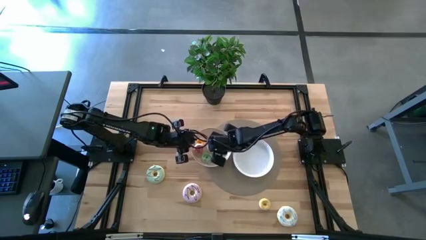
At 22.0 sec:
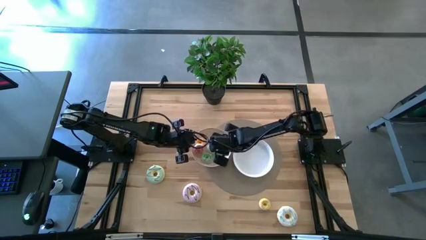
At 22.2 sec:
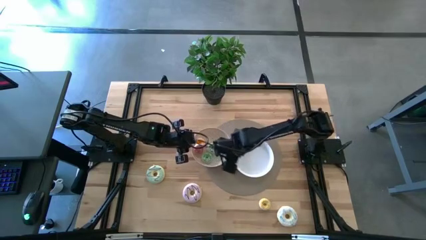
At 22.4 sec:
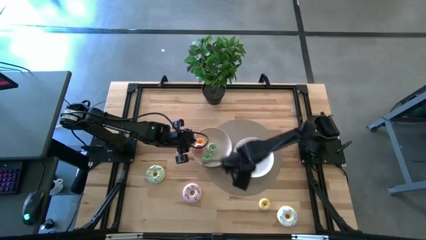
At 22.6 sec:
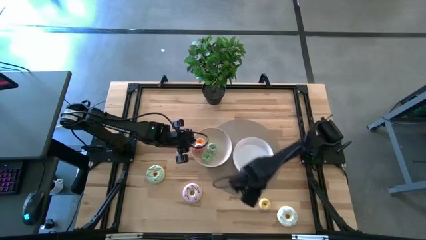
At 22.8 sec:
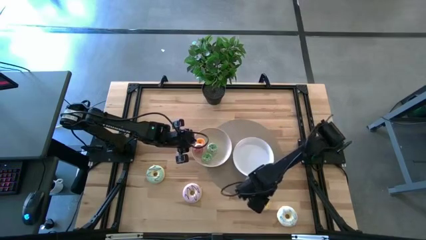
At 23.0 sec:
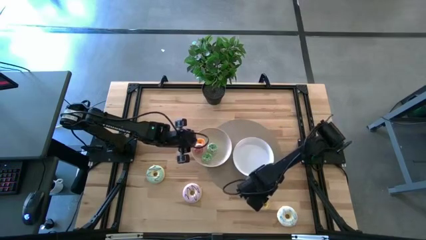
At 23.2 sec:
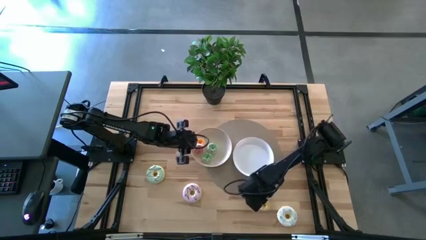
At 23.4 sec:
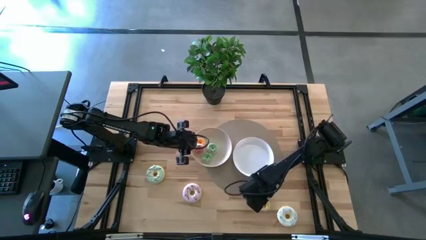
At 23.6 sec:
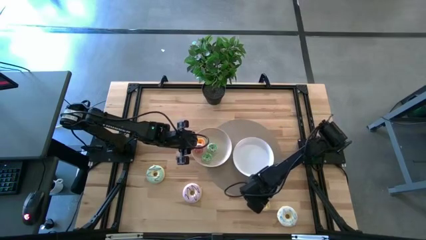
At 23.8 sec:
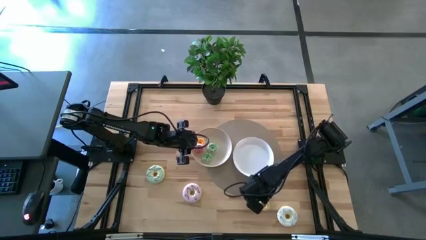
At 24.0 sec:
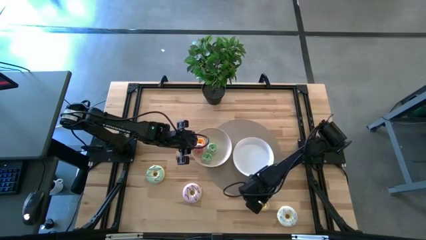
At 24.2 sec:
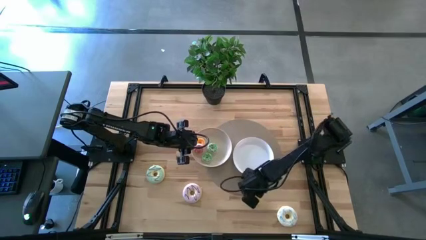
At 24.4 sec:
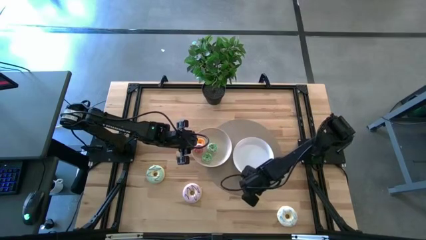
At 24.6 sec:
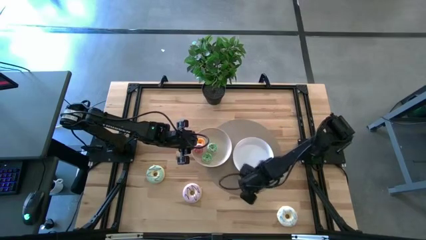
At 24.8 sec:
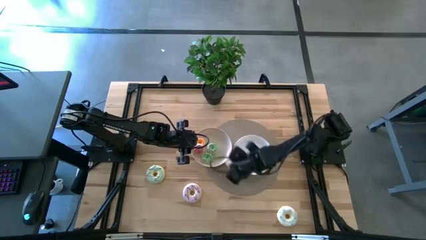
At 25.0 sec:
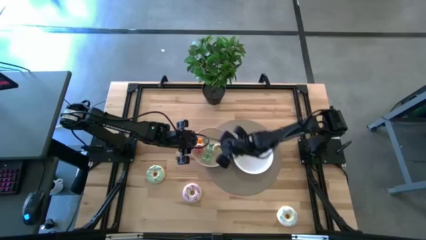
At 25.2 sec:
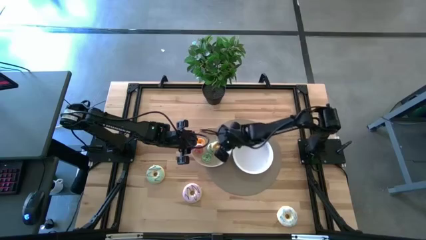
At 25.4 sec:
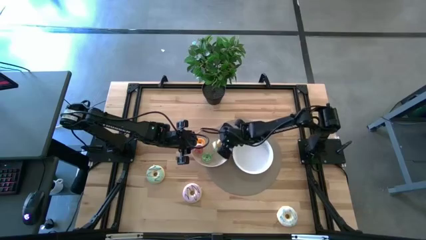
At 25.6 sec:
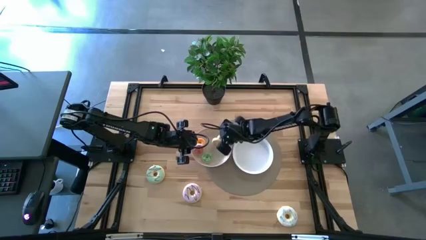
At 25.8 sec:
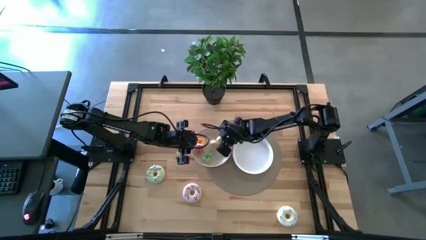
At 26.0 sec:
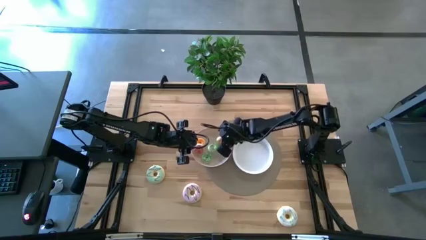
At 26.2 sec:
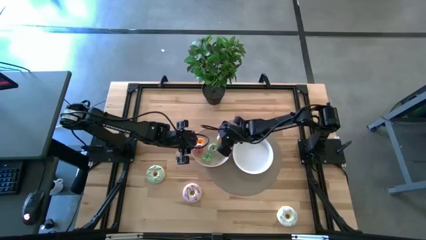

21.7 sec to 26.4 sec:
Task: Pick & Place donuts
Put the small yellow donut into the left white plate

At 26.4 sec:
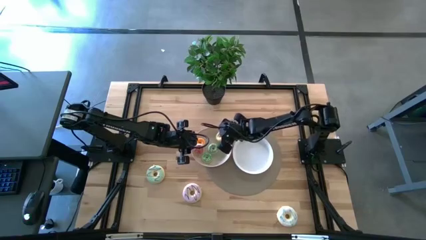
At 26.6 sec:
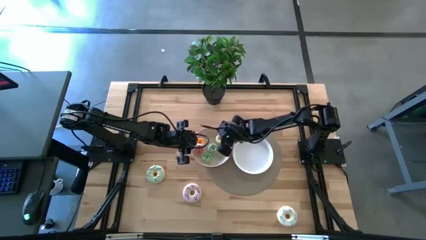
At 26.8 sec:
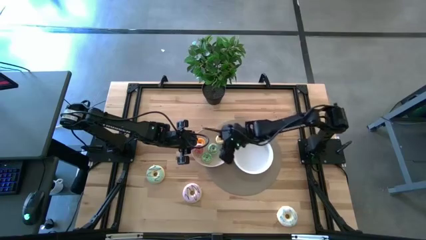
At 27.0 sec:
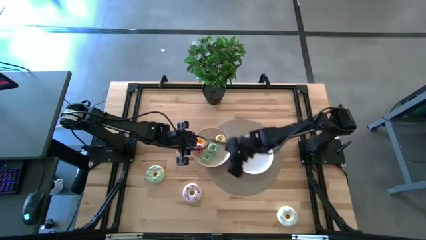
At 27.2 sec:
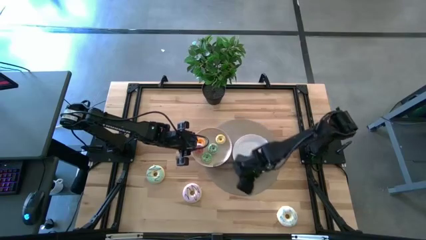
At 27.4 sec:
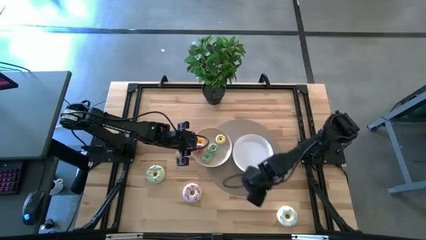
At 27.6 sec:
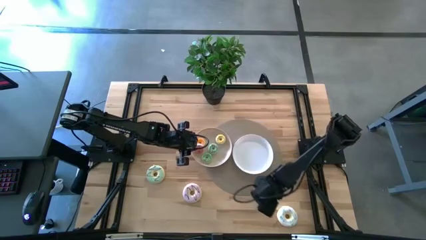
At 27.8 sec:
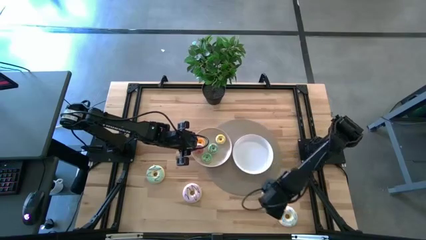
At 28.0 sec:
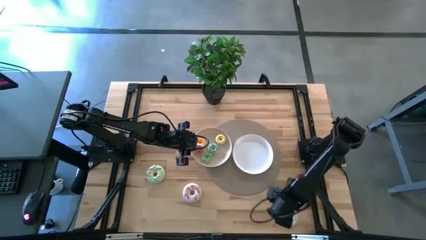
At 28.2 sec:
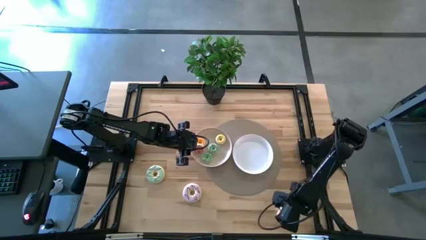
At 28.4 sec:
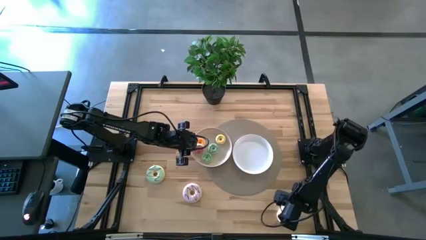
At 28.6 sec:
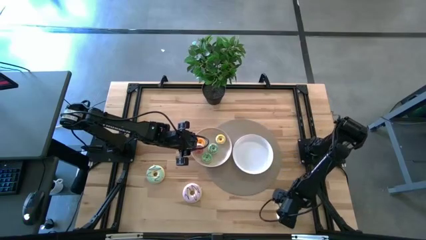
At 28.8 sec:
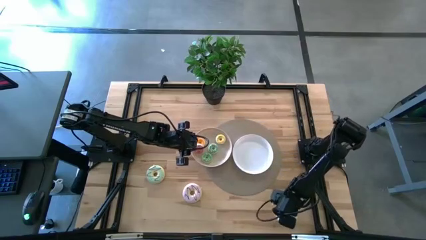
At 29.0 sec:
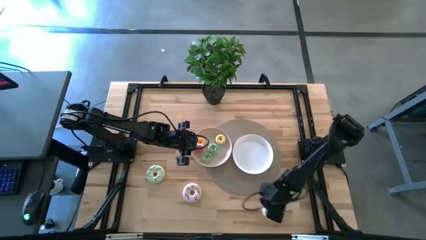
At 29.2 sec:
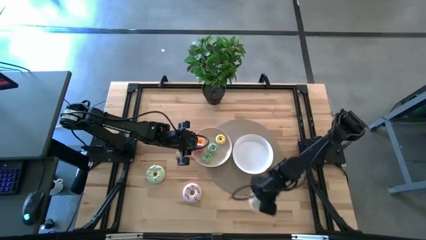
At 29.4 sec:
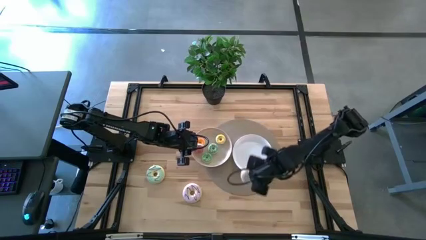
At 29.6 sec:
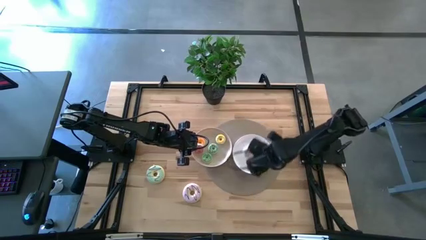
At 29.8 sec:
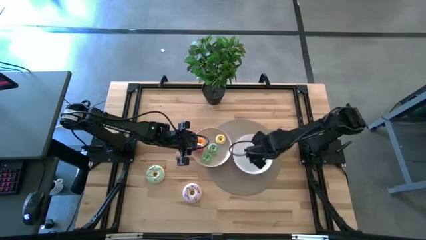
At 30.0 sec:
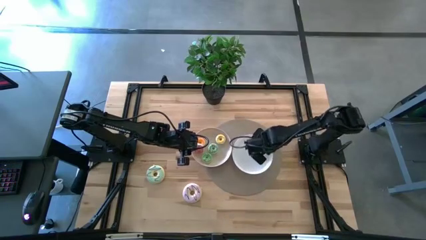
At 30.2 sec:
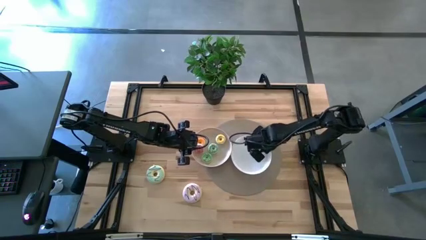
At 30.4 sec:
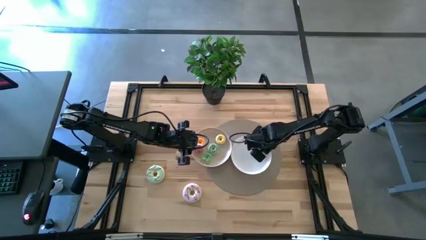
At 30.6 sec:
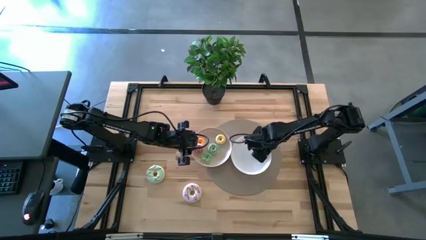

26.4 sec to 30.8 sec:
Put the big white donut into the right white plate

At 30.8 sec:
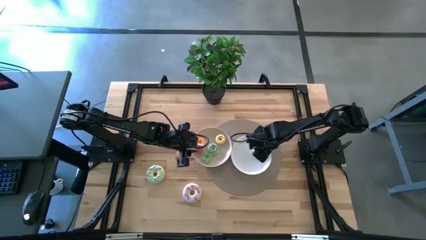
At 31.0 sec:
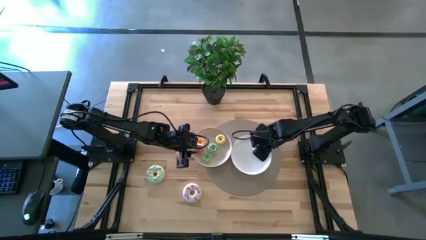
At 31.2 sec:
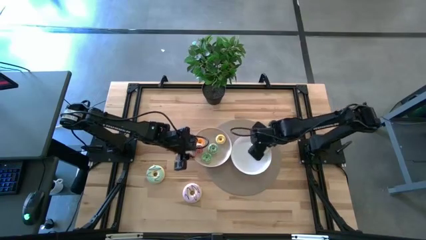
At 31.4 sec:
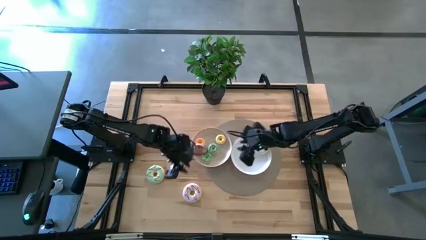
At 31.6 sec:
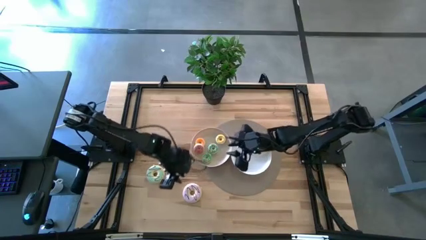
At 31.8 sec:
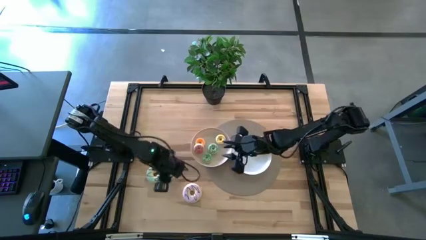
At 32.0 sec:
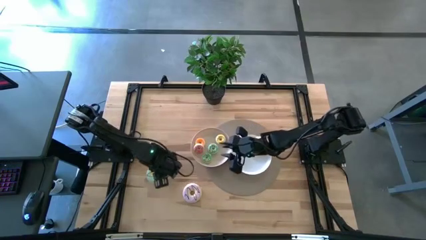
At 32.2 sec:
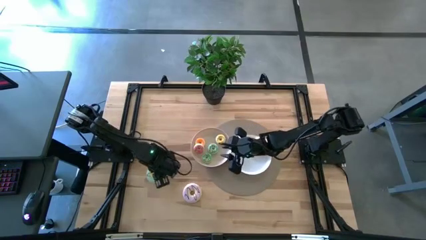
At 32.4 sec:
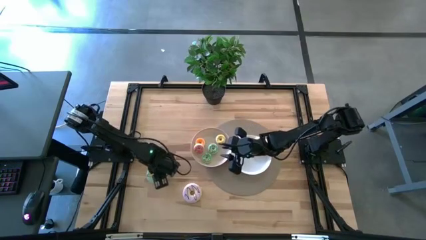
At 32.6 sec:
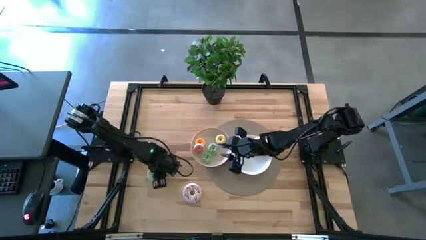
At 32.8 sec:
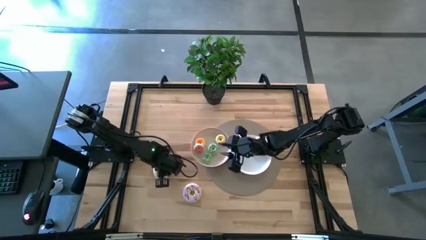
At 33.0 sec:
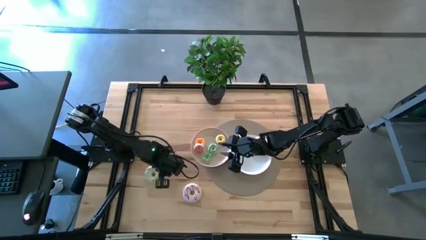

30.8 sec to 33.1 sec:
Put the big light blue donut into the right white plate

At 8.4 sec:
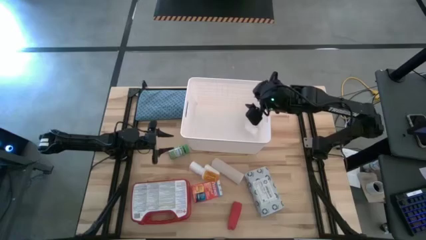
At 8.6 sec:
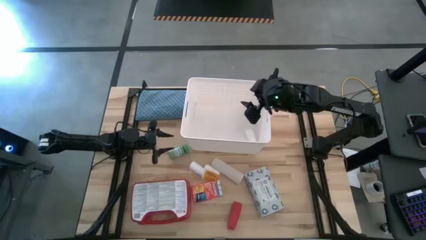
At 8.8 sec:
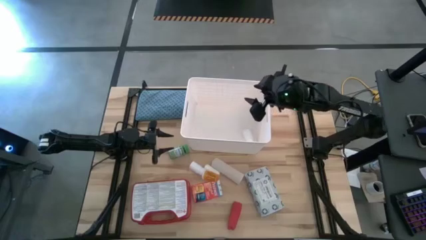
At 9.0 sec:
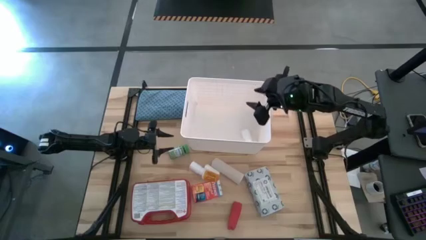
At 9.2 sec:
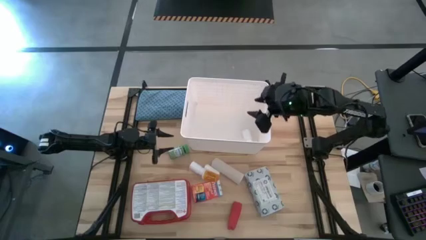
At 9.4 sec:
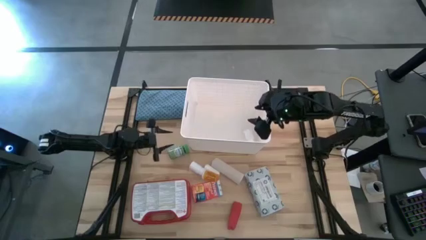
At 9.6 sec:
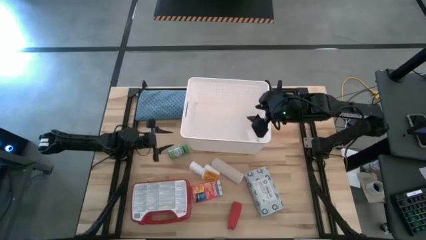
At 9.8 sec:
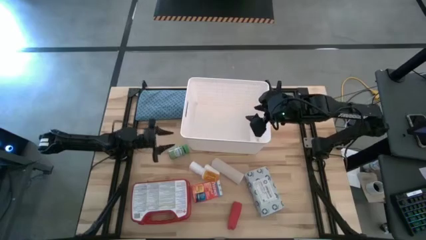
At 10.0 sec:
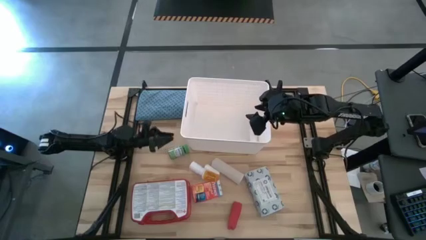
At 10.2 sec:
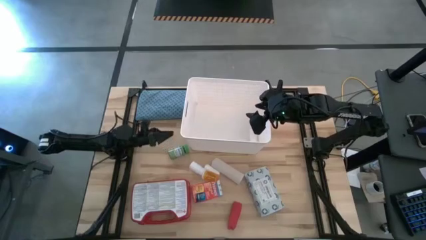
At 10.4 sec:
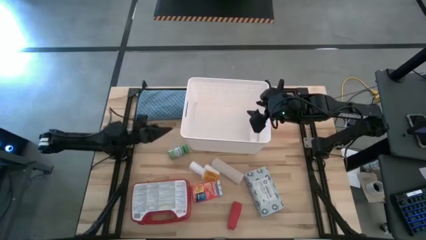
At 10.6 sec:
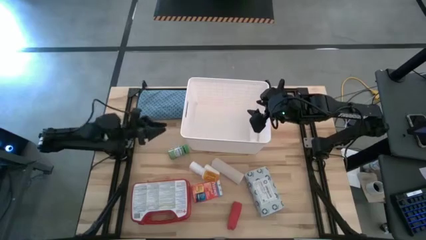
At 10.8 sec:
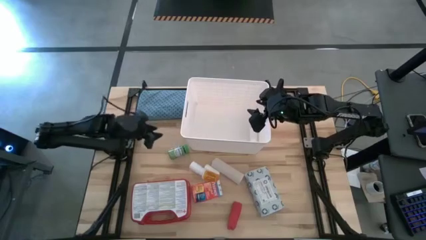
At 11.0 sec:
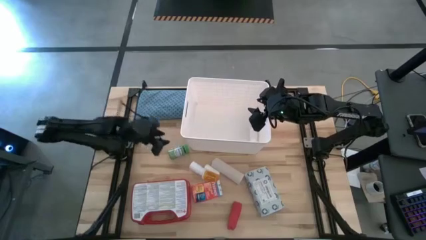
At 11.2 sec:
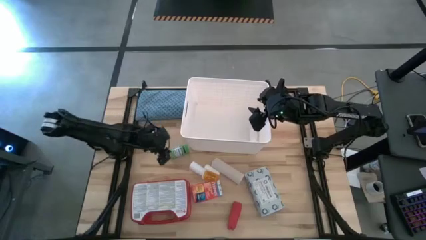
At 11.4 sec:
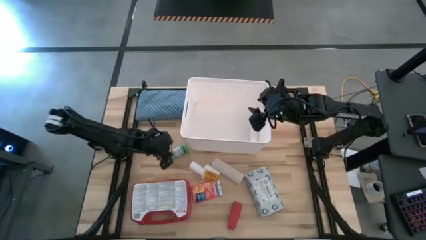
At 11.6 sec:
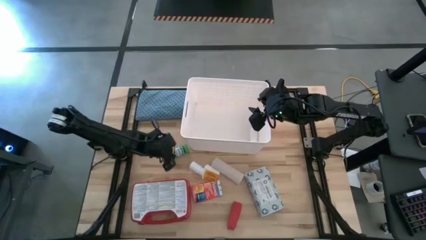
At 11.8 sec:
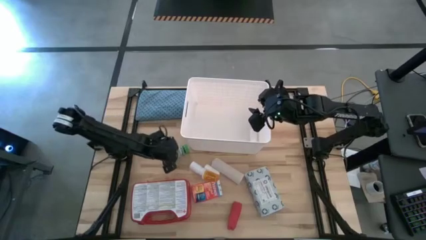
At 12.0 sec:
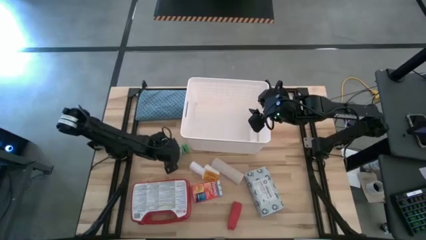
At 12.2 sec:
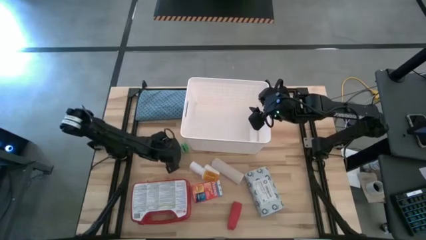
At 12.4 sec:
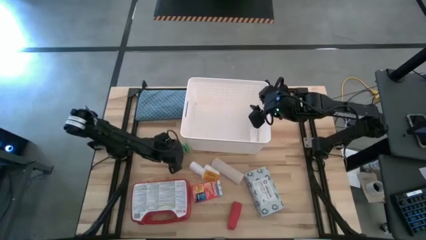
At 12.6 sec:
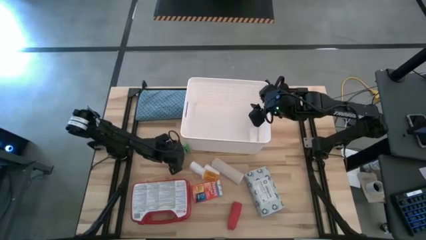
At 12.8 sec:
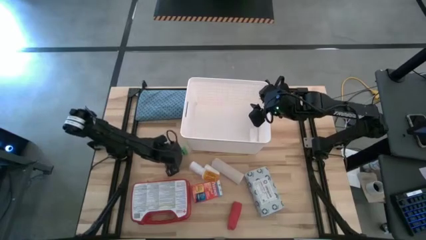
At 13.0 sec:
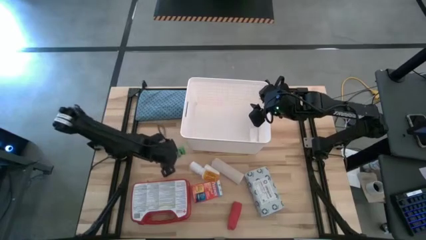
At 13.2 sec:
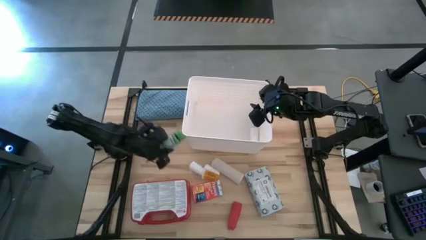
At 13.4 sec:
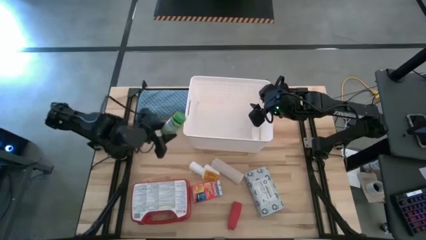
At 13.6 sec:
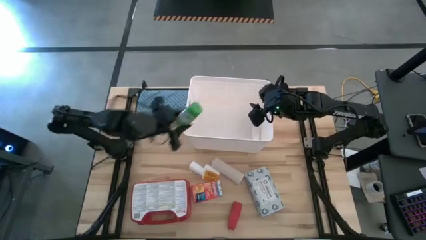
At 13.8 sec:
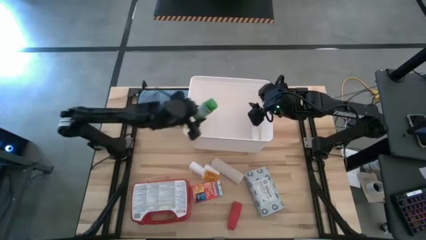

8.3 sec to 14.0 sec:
Task: Pick & place medical supplies in basket/bin
Put the green medicine bottle into the white bin
